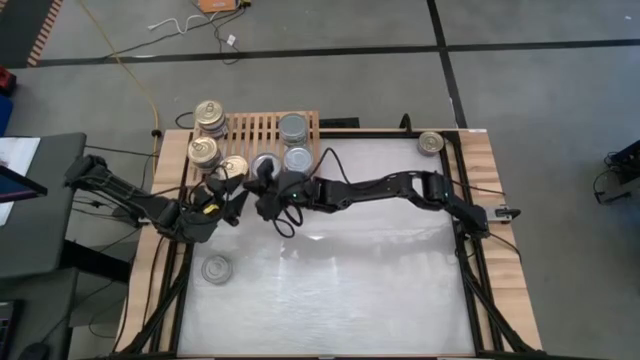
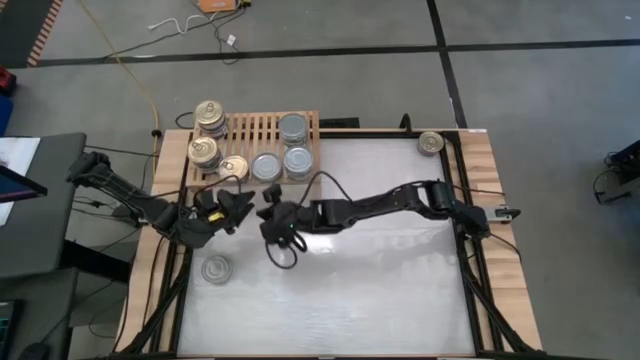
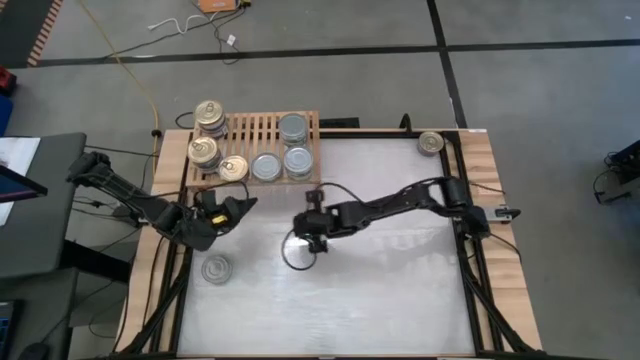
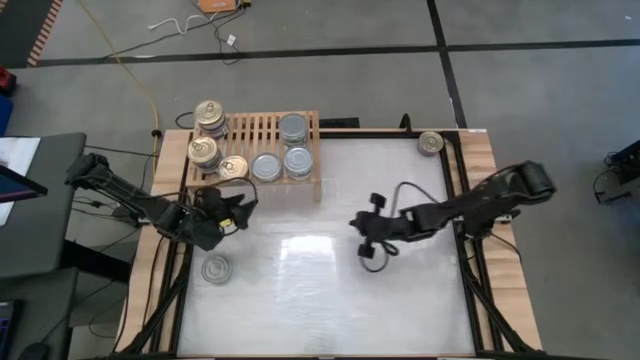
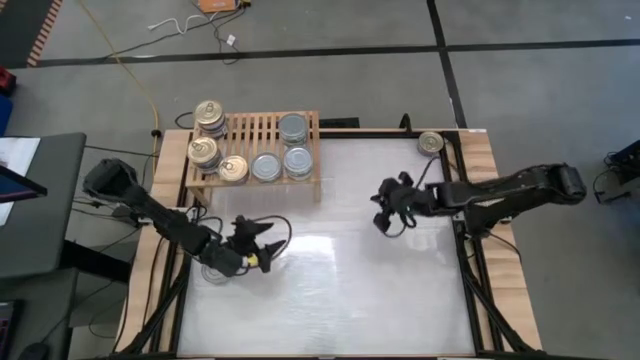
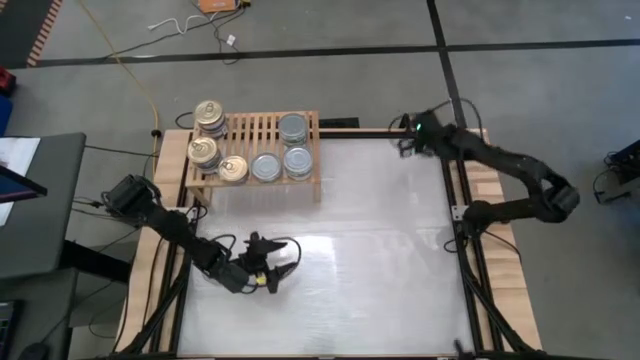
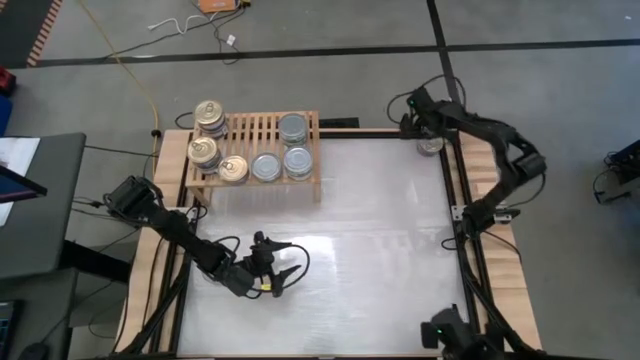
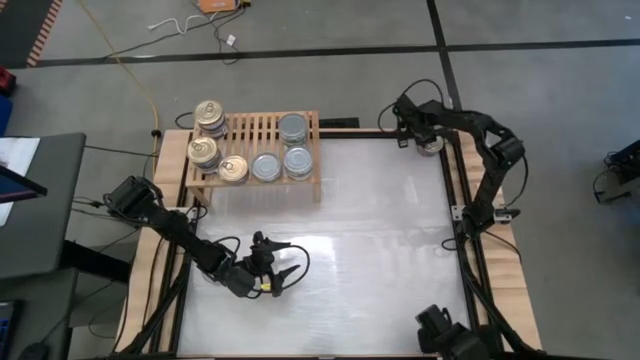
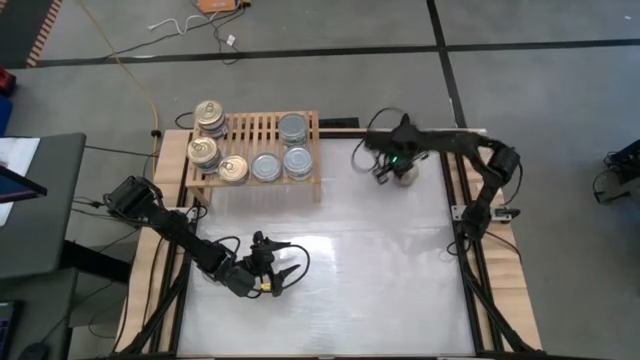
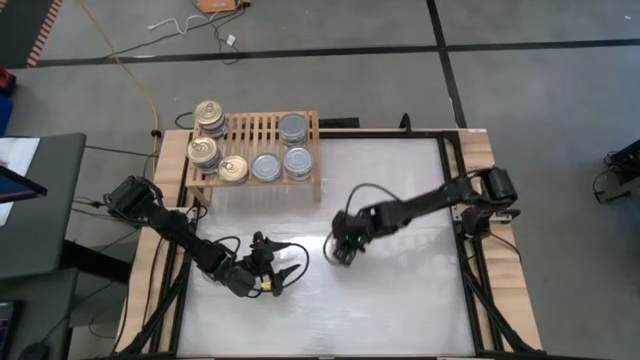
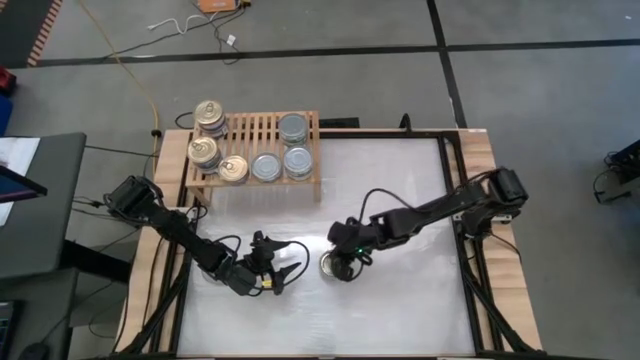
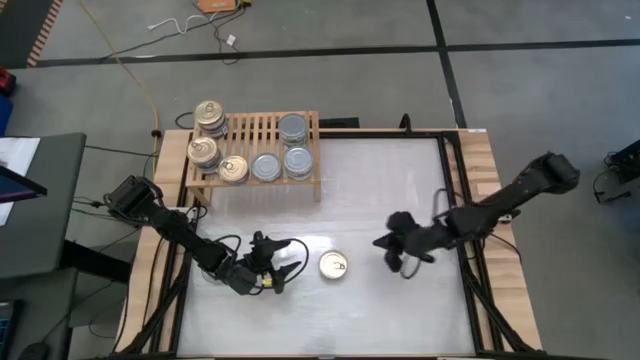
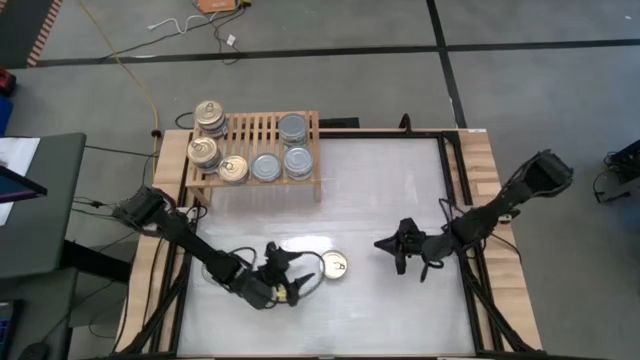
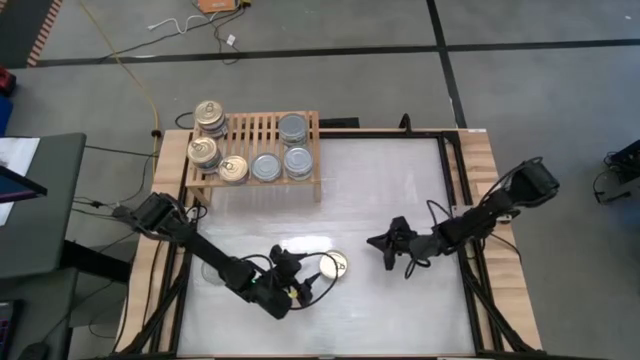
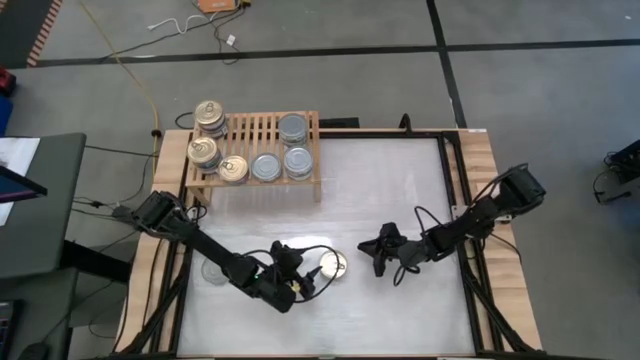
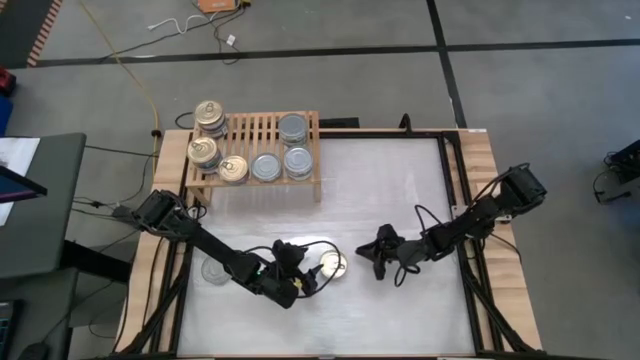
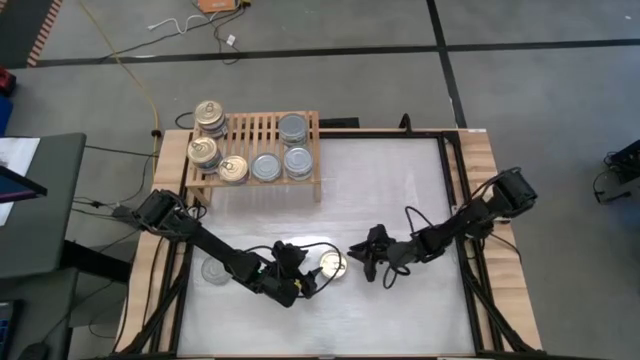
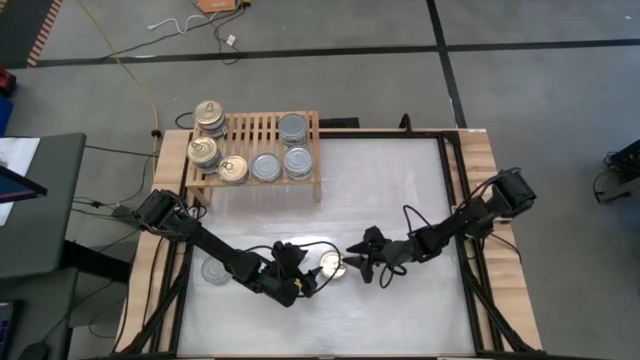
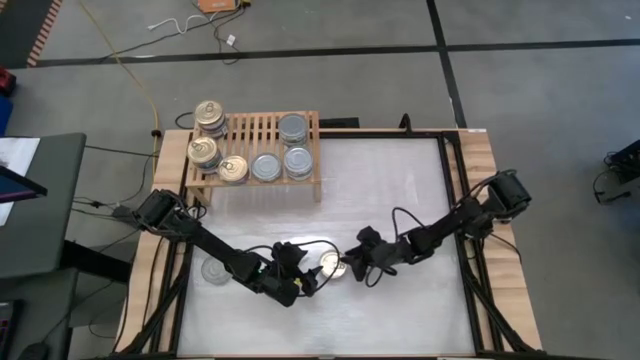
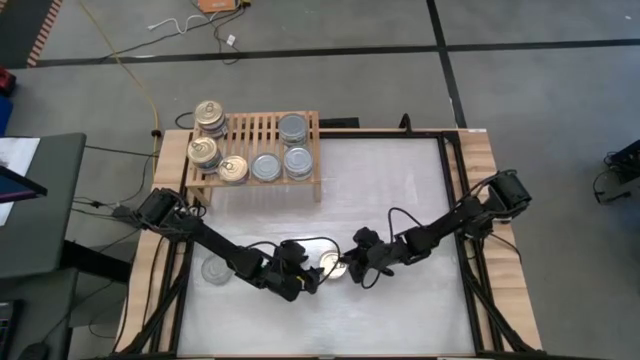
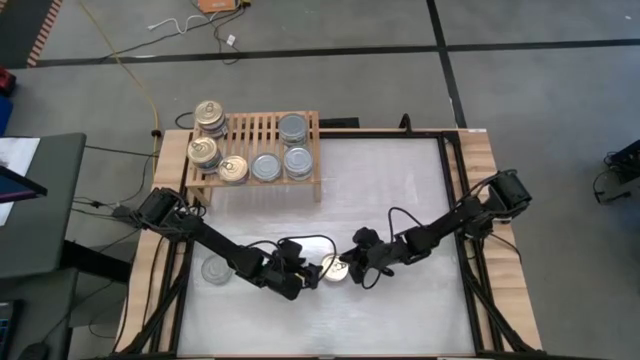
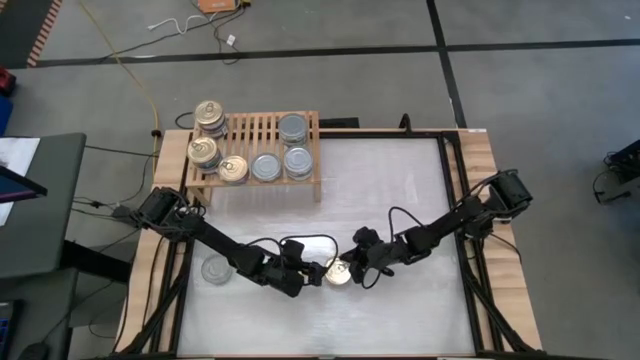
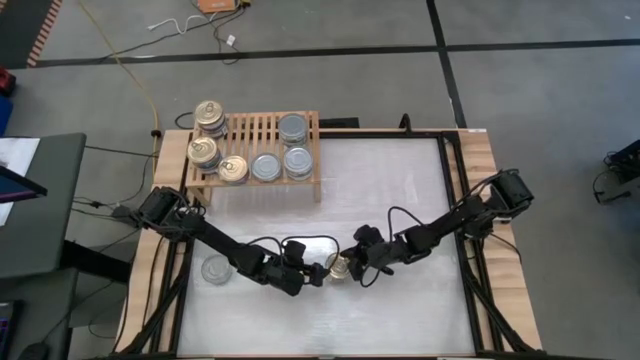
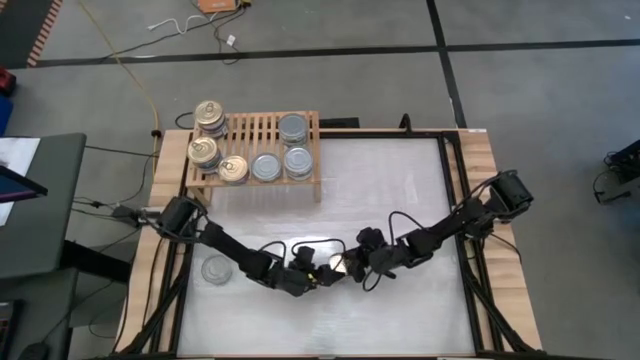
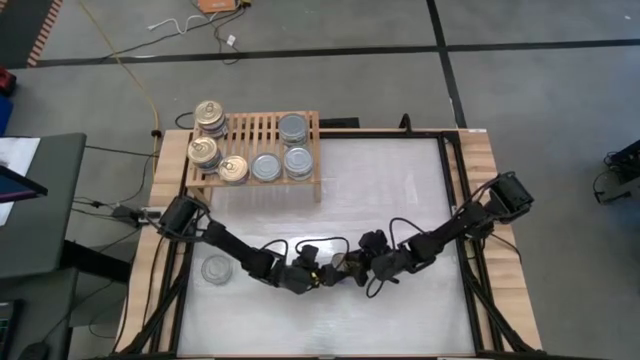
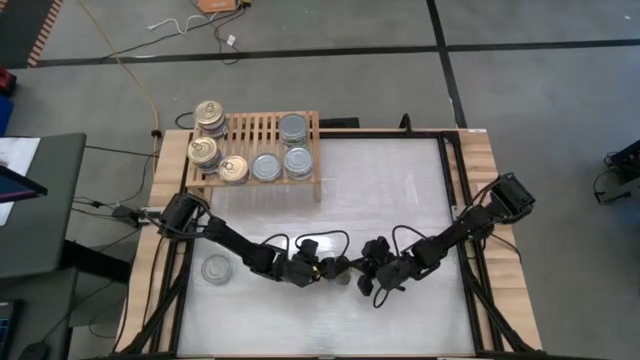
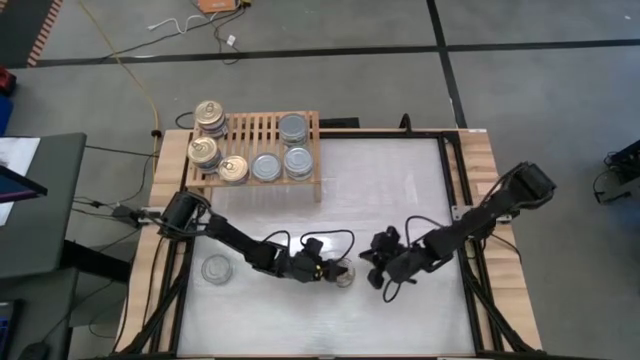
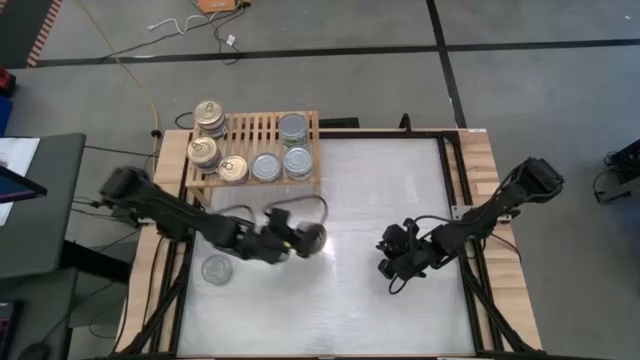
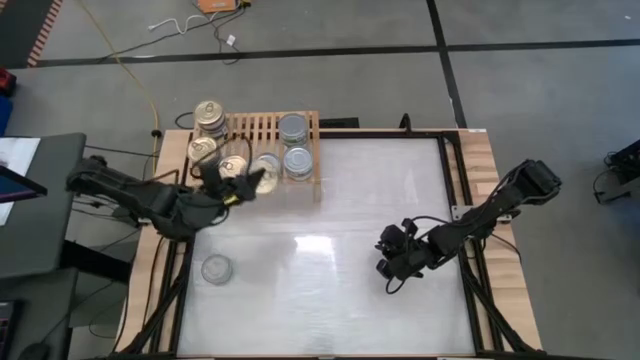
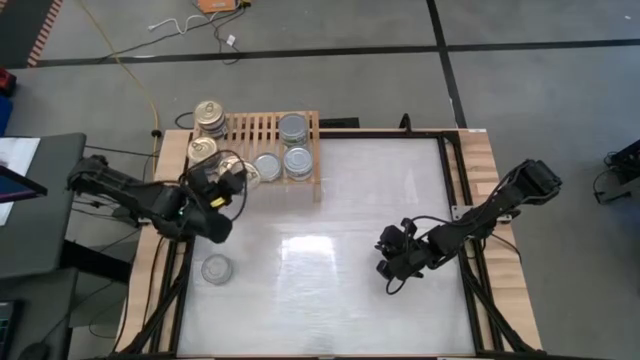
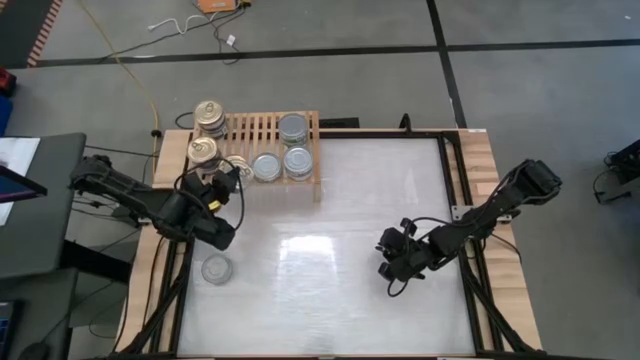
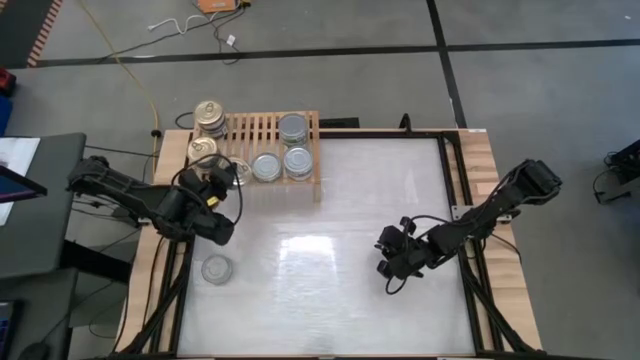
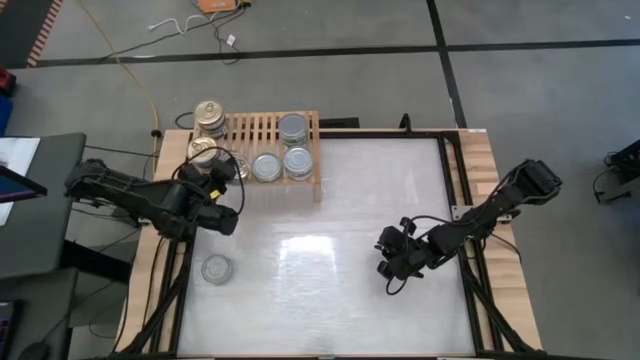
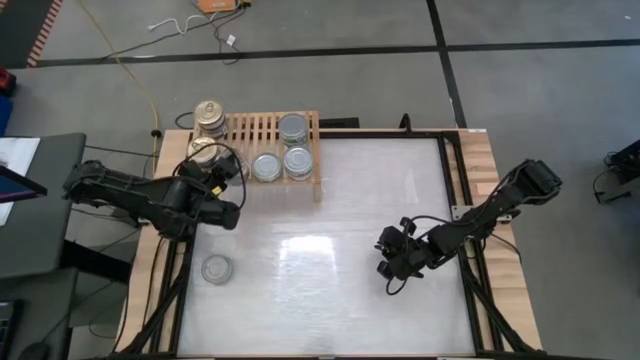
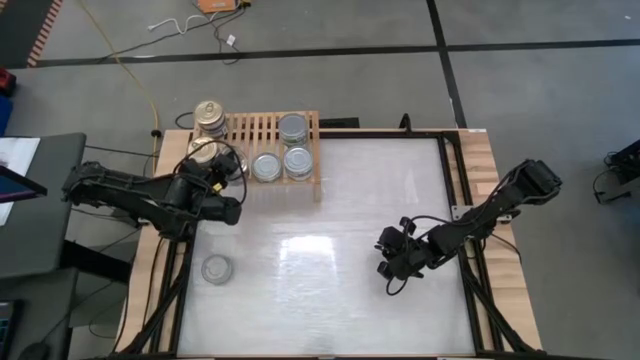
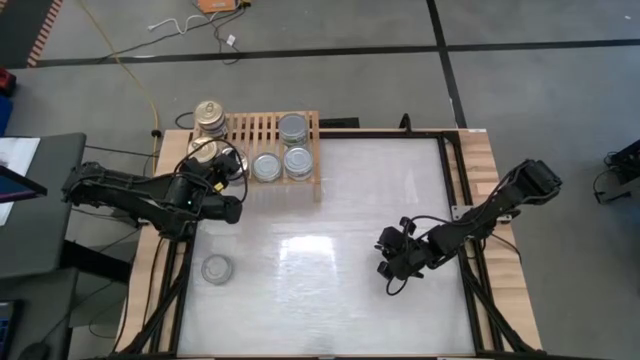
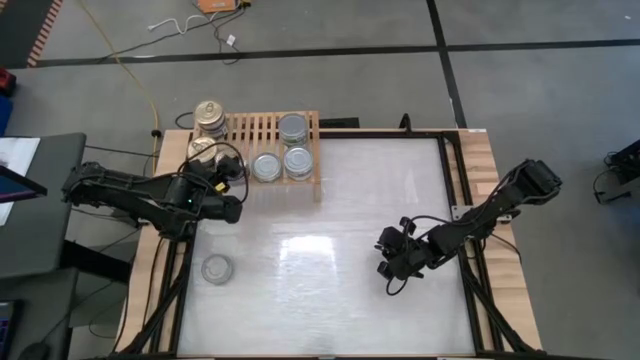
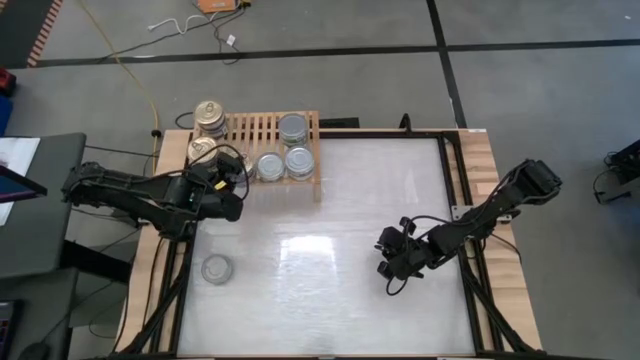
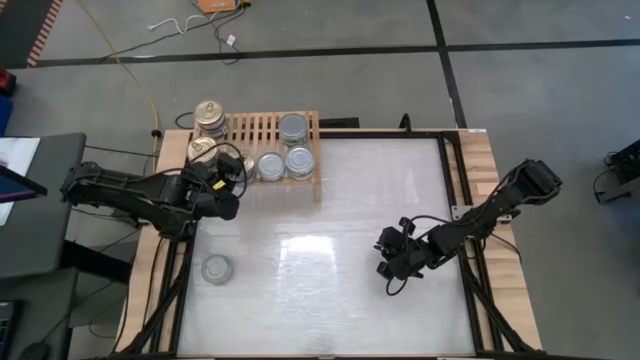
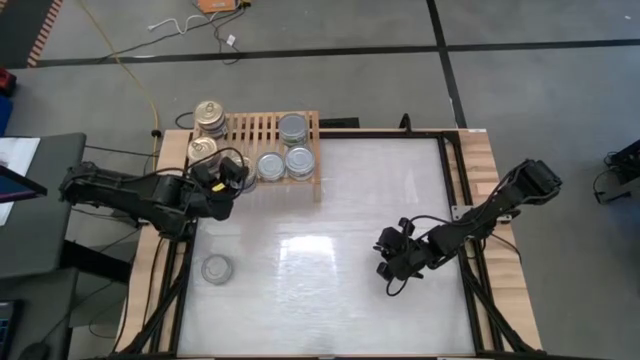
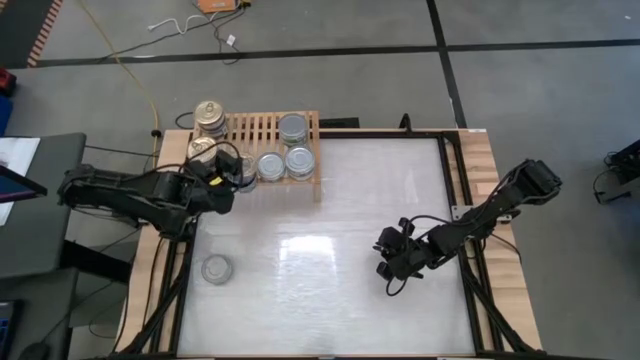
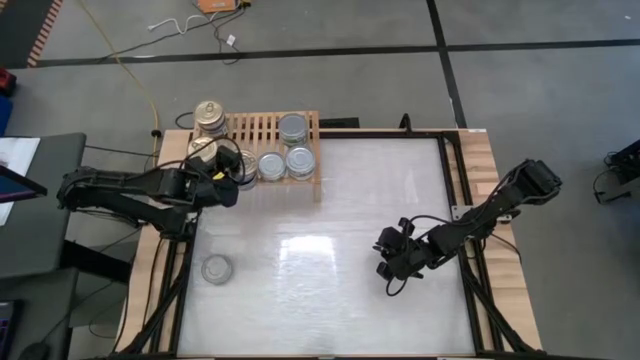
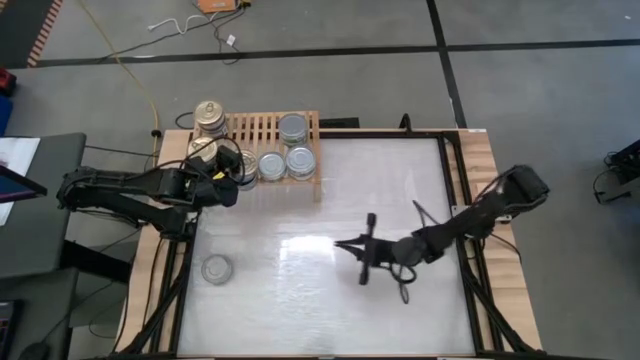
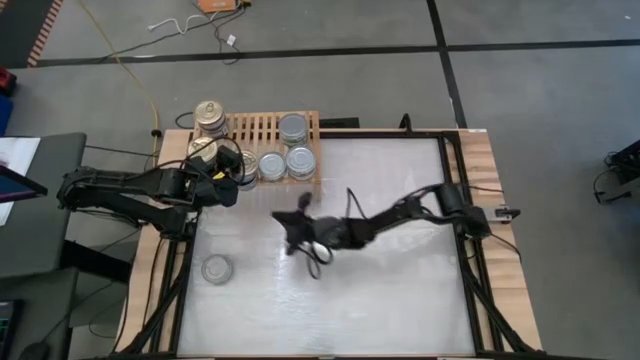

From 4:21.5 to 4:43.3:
Task: Stack canned seafood by type on shelf
Stack the blue tuna can on top of the bottom right blue tuna can on the shelf
